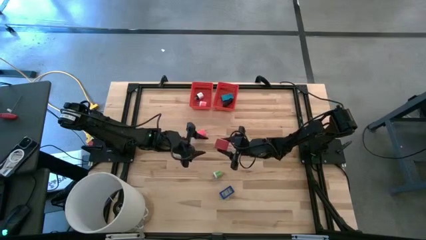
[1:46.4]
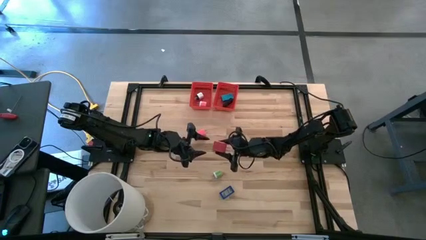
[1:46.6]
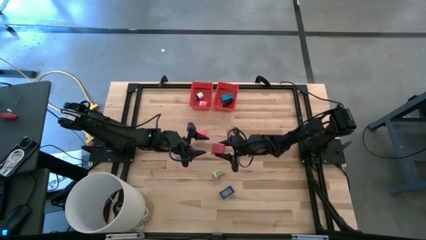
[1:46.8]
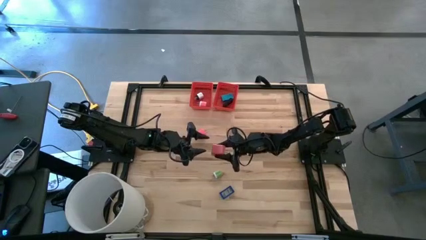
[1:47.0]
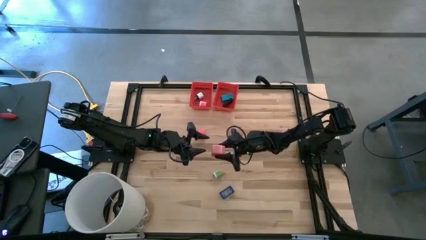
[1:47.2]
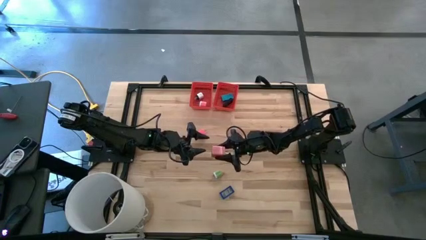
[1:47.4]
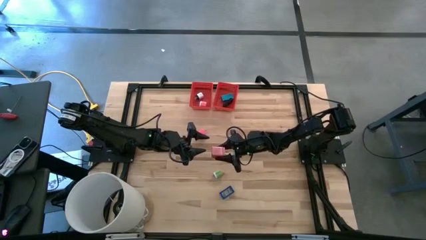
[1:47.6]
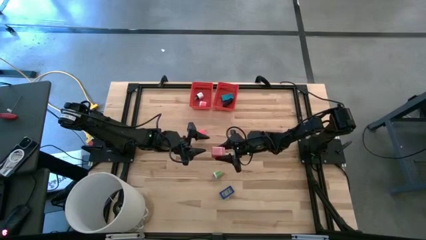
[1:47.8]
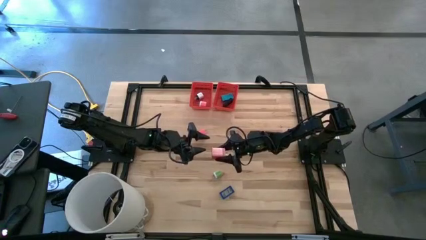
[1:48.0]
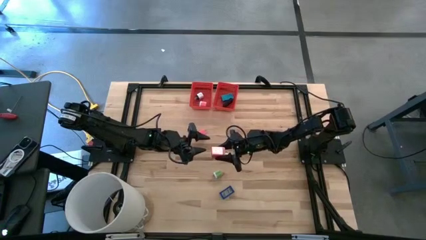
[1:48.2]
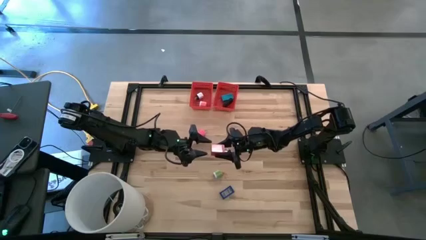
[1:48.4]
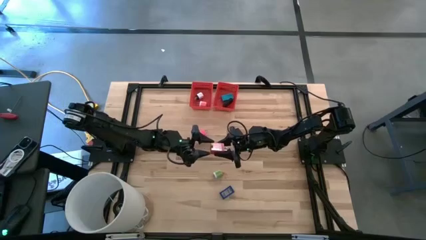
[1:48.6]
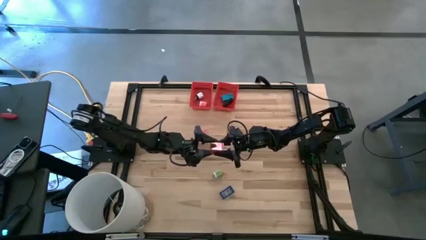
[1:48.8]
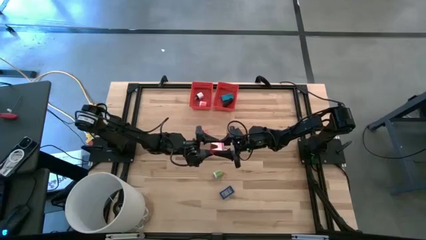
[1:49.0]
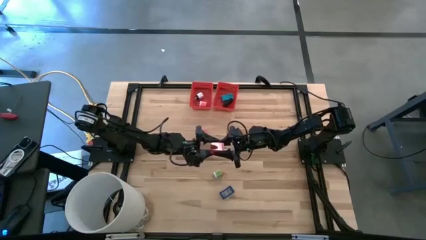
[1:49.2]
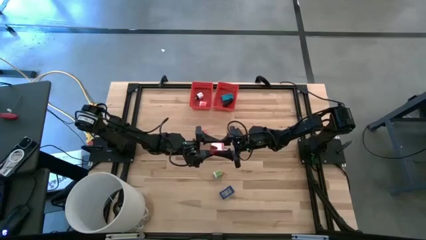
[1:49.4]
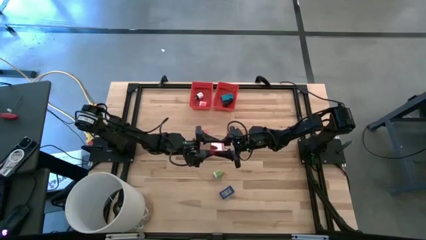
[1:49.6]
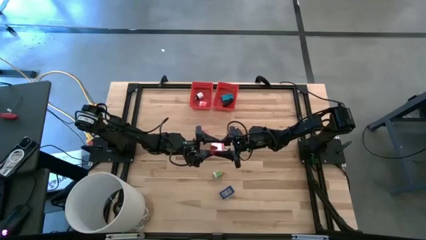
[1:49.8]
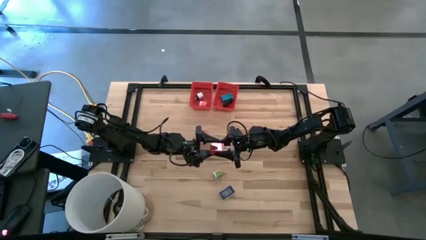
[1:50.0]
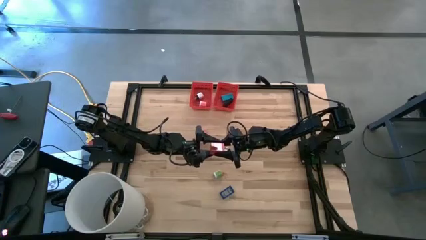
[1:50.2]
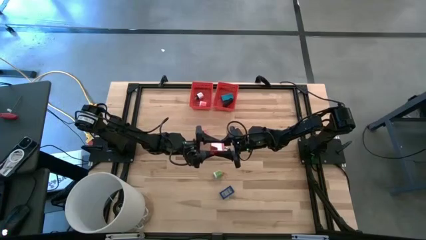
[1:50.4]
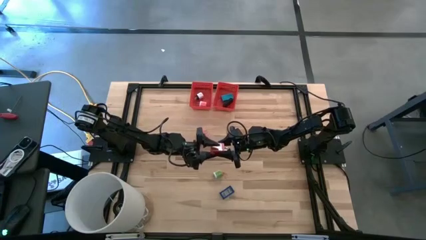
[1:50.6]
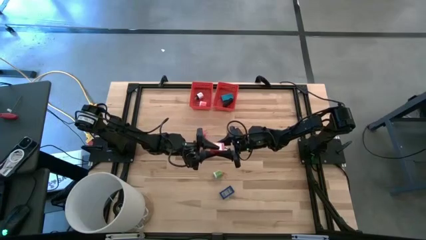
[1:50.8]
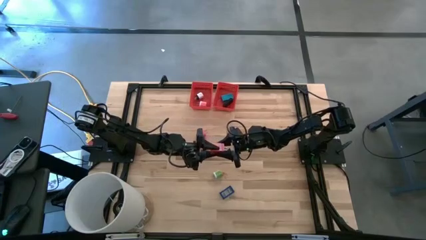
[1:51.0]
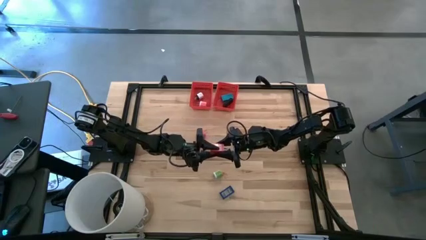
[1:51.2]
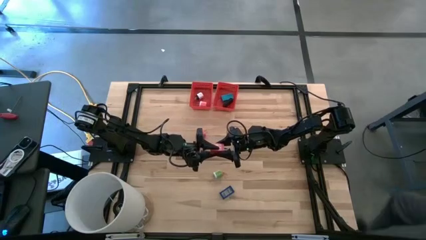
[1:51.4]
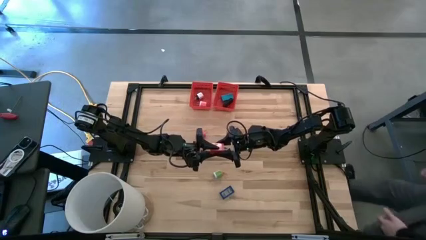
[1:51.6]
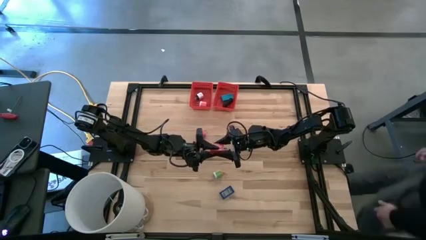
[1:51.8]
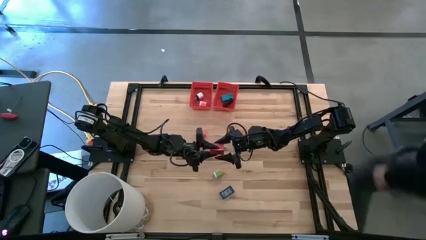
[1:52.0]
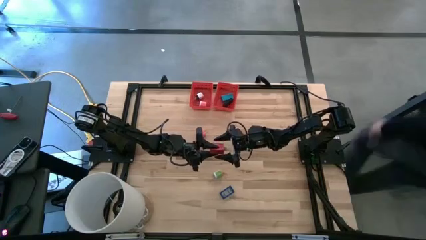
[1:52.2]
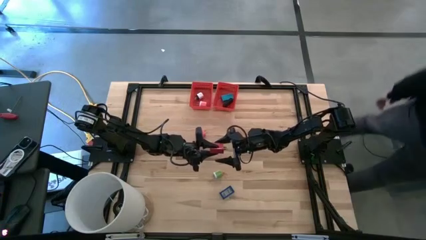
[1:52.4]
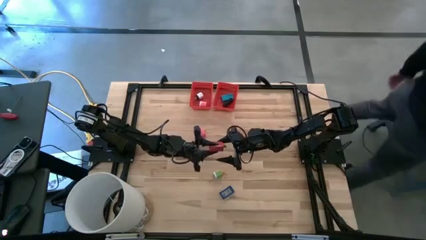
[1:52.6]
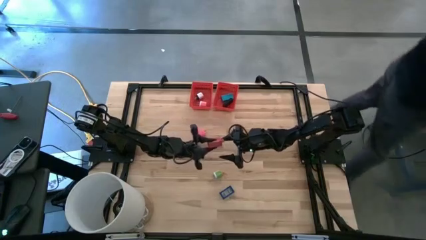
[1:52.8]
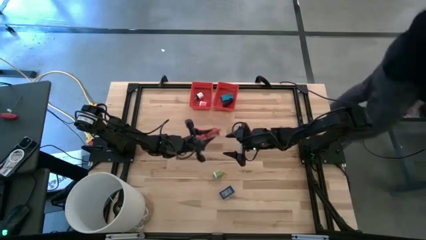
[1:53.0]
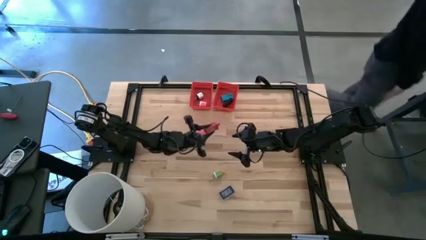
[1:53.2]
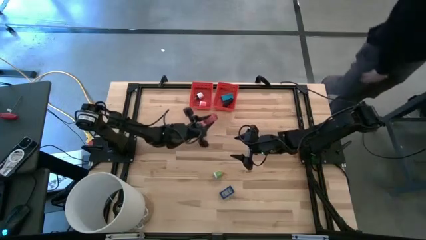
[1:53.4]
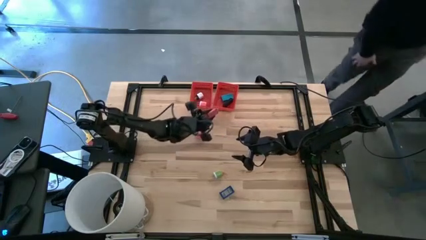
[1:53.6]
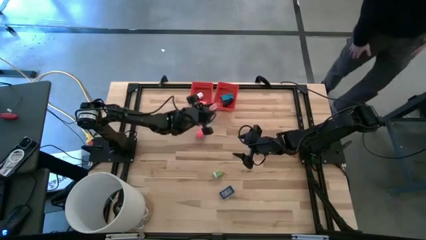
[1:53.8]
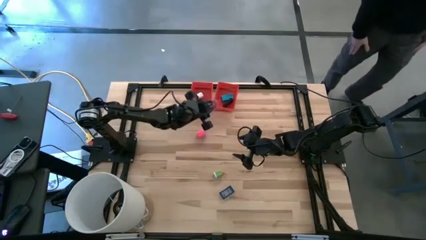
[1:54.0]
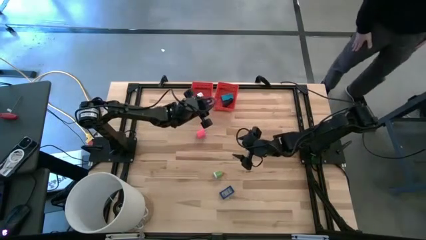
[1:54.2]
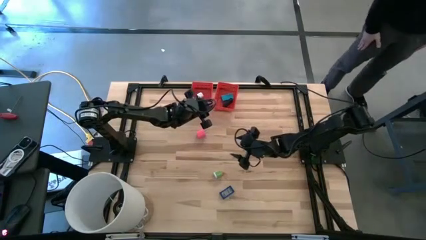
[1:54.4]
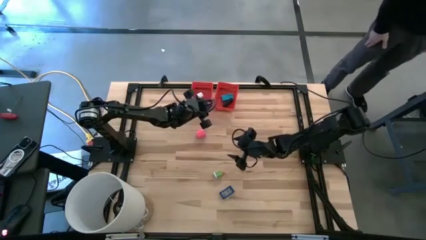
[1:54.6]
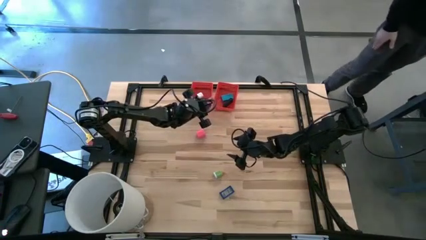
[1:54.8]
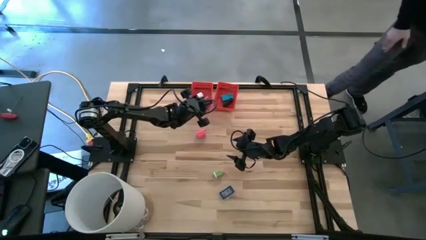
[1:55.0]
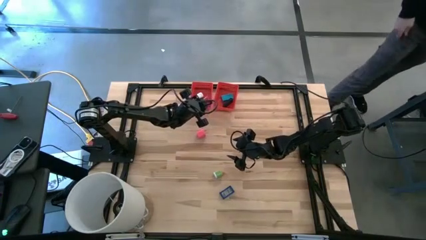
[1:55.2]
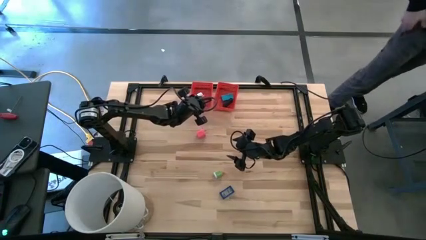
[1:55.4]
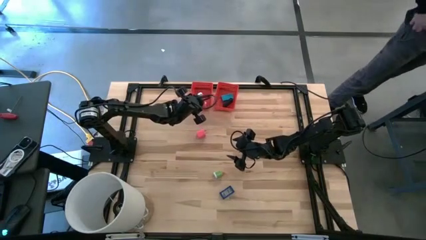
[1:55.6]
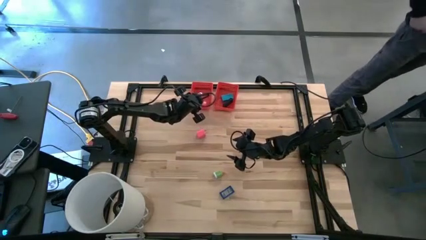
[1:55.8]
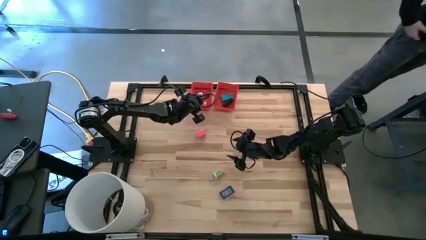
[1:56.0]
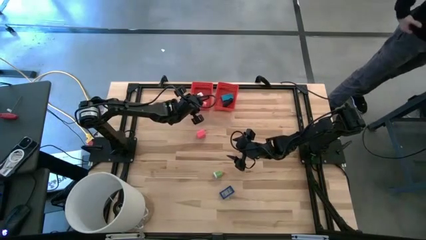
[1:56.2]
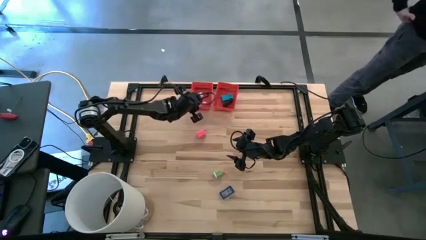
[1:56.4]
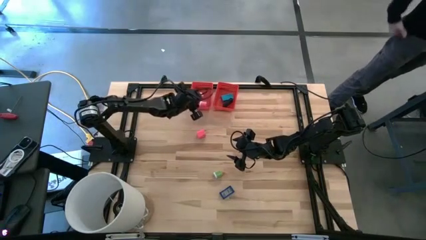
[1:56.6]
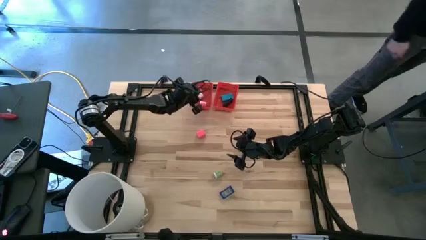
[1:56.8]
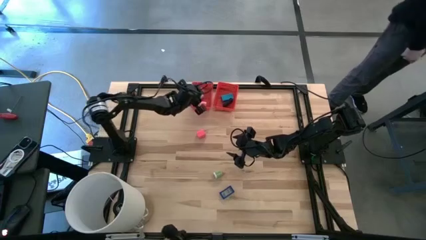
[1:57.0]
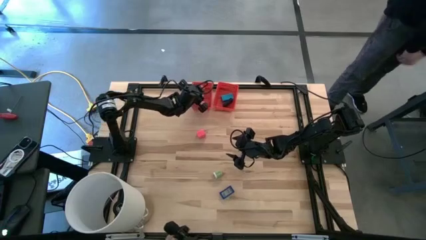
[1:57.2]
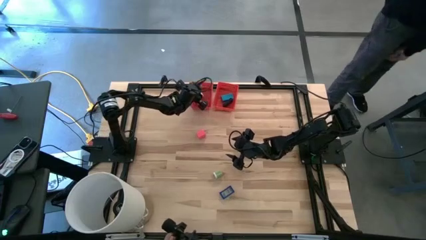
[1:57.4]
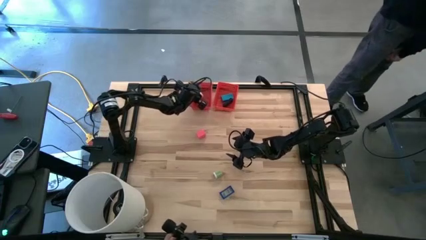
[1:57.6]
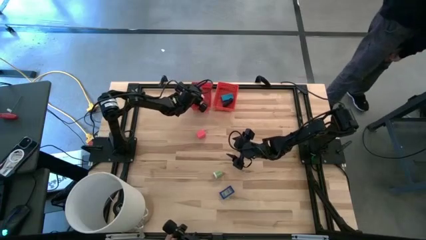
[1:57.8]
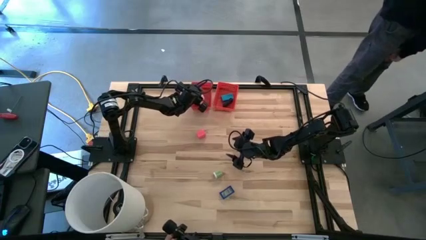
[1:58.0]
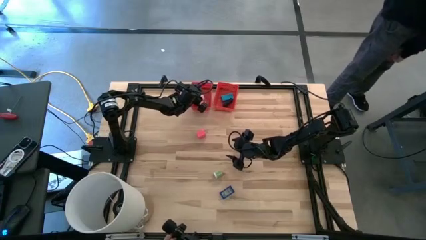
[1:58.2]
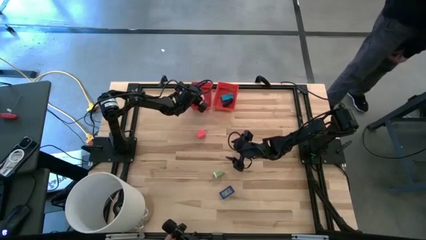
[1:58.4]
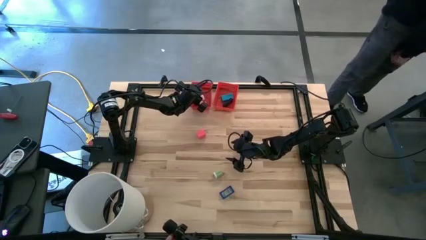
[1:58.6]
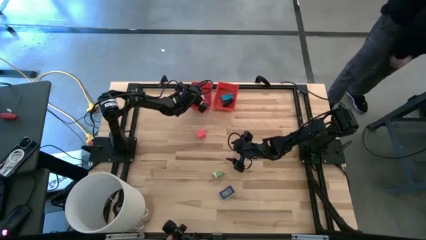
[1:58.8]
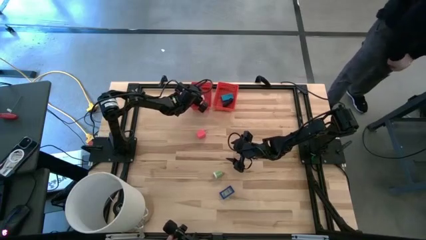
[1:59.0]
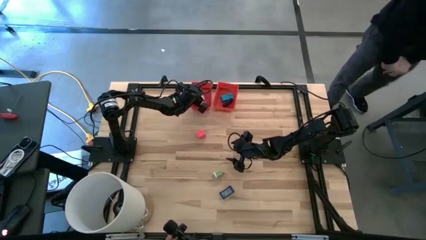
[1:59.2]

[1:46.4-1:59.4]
Task: Pick & Place Office items
Put the red charger adapter into the left red basket

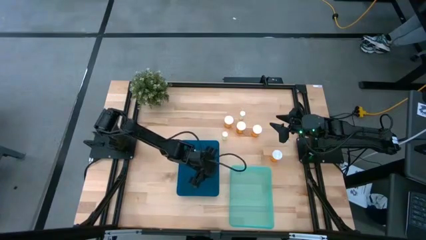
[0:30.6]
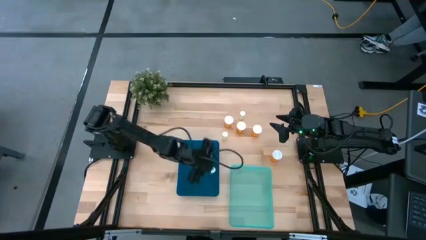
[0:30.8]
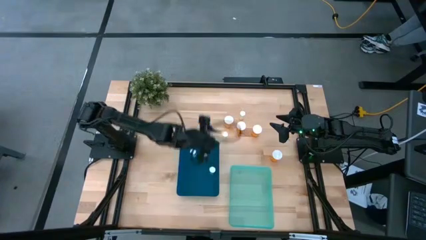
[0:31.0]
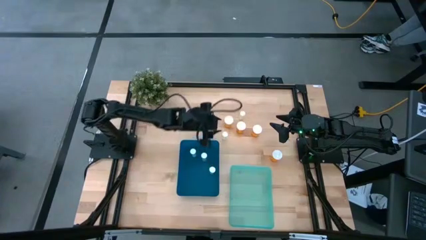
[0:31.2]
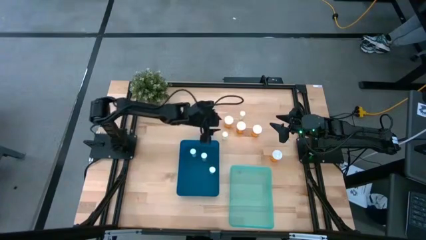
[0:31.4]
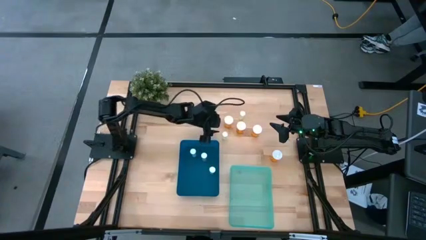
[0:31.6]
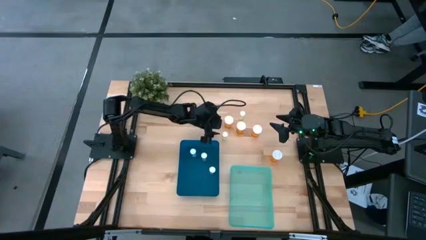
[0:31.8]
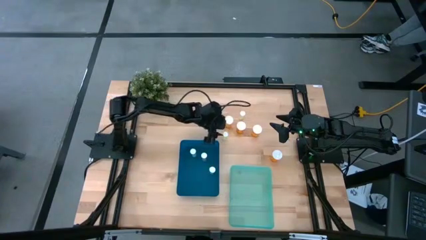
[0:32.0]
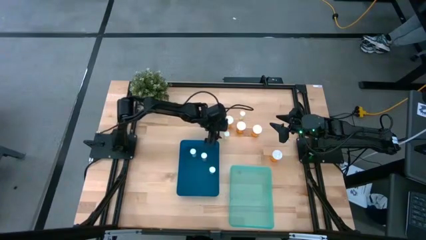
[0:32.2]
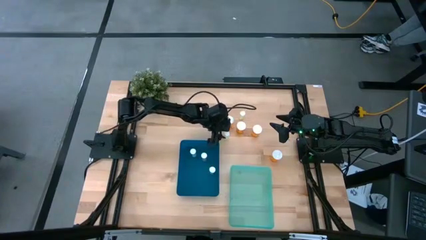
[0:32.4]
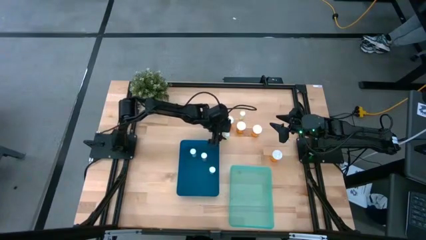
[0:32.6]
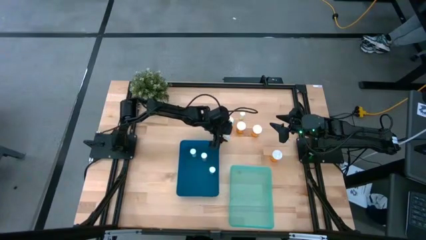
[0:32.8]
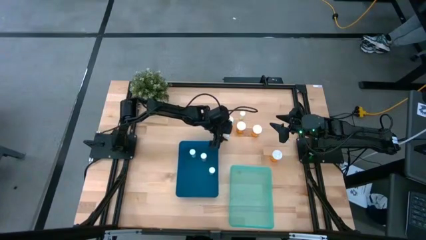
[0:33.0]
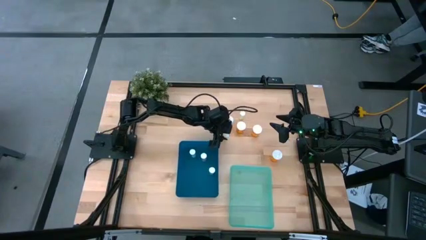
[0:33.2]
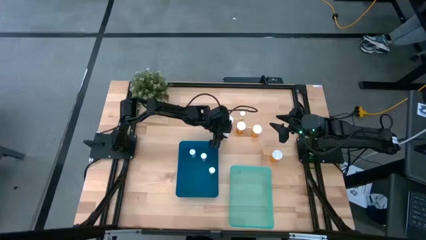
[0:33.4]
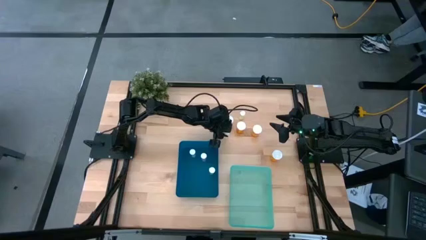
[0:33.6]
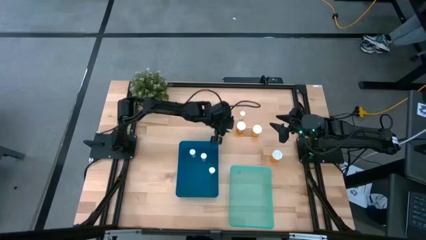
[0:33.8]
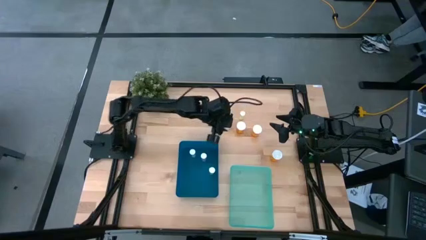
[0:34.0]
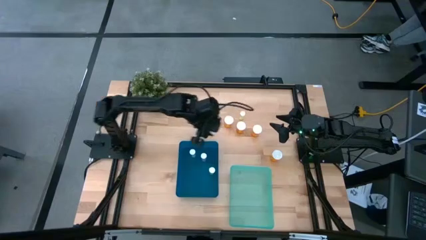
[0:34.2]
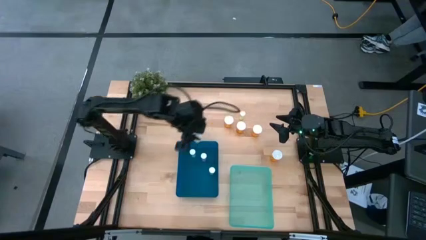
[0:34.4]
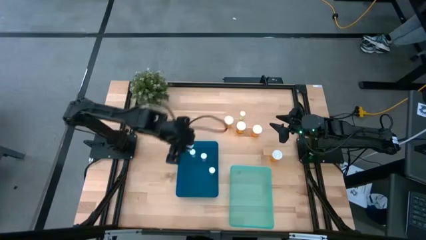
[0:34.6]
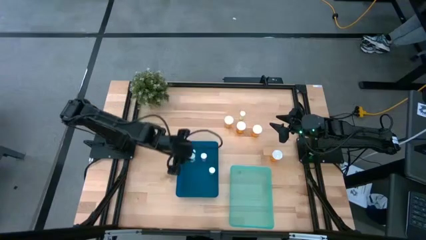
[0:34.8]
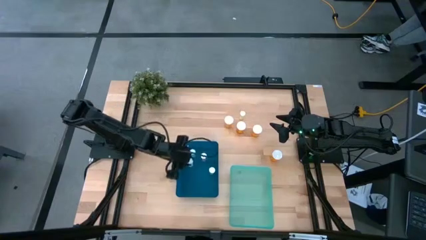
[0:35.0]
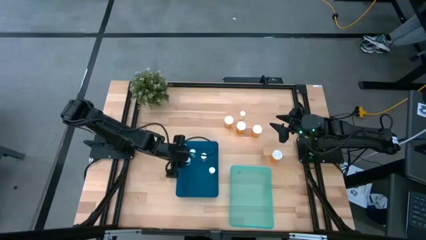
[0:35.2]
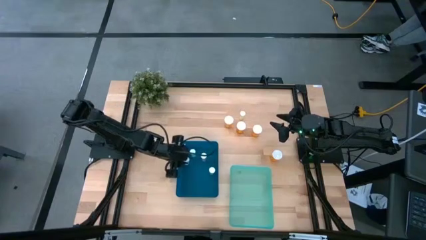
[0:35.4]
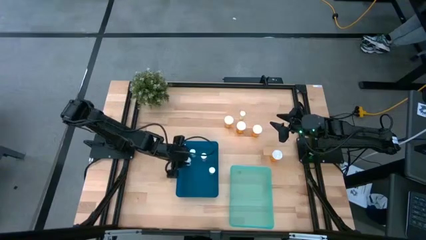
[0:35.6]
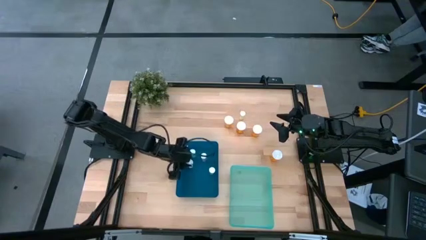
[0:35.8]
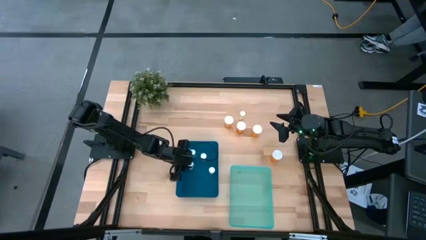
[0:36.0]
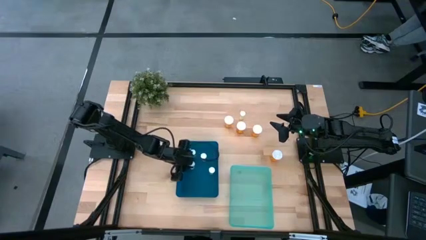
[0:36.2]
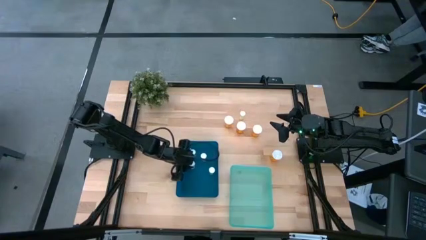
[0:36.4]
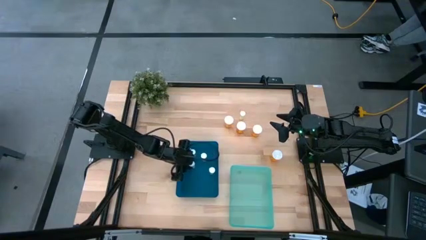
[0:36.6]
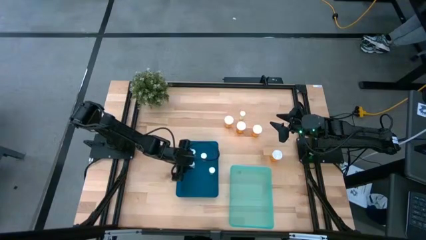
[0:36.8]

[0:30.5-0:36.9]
Task: Pick and place medicine bottles into bin by pill shape (circle, oval)
Put the left yellow pill bottle into the blue bin
